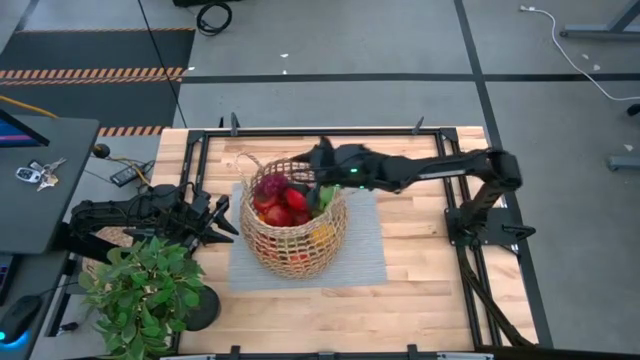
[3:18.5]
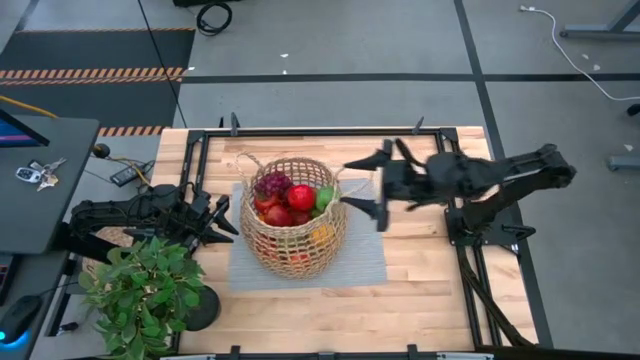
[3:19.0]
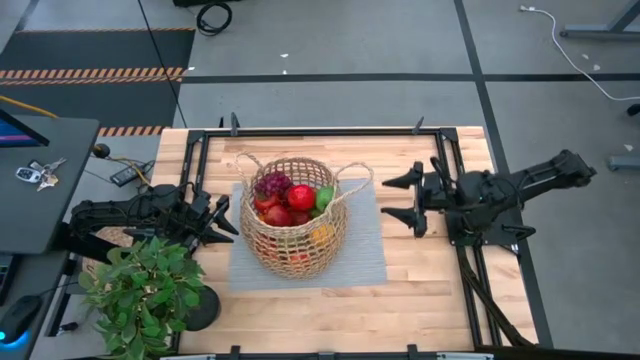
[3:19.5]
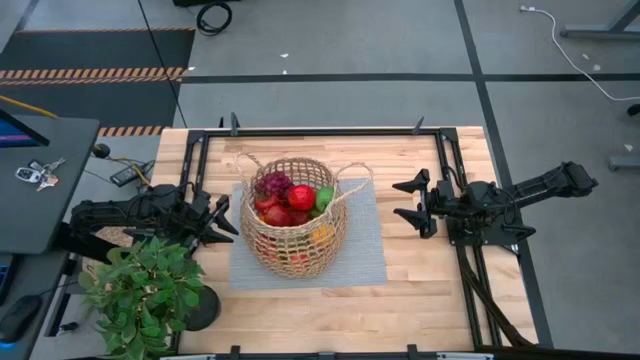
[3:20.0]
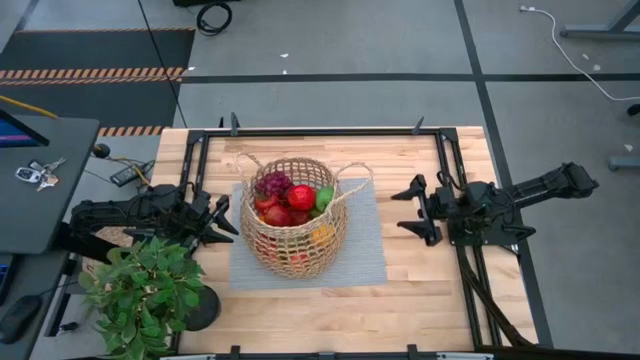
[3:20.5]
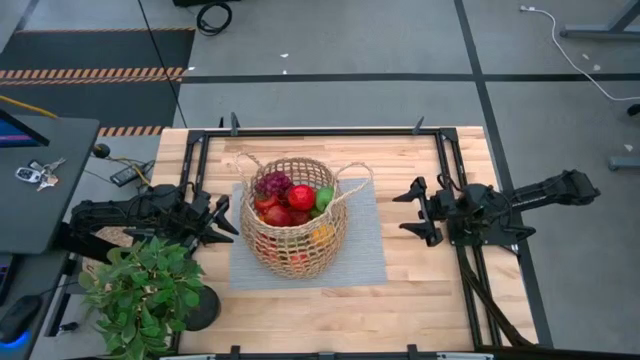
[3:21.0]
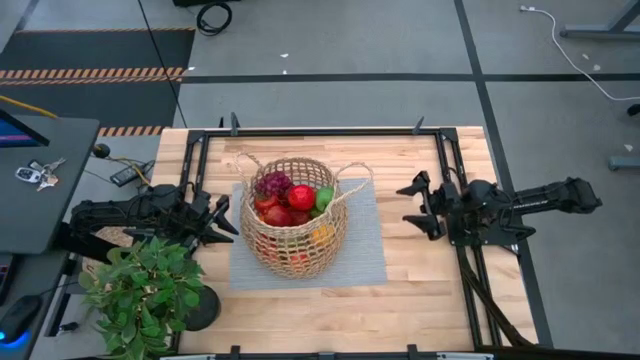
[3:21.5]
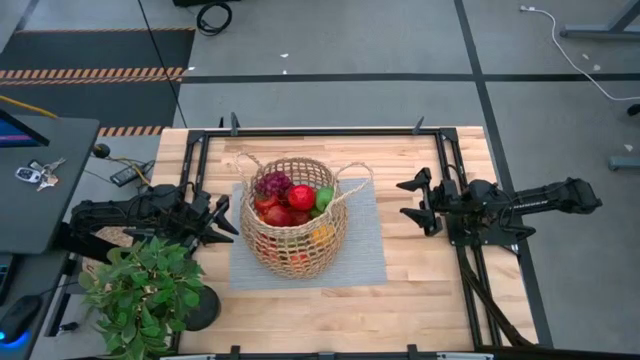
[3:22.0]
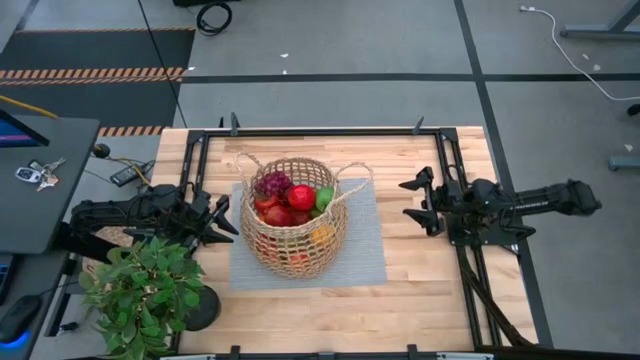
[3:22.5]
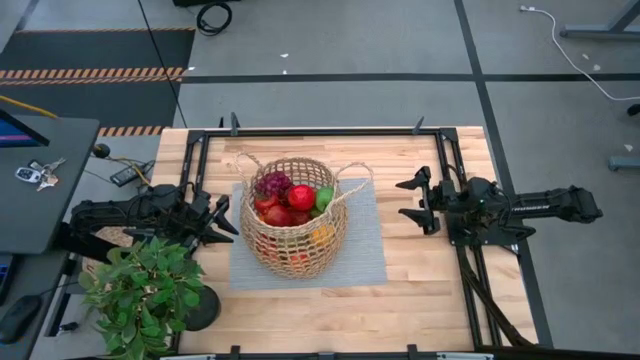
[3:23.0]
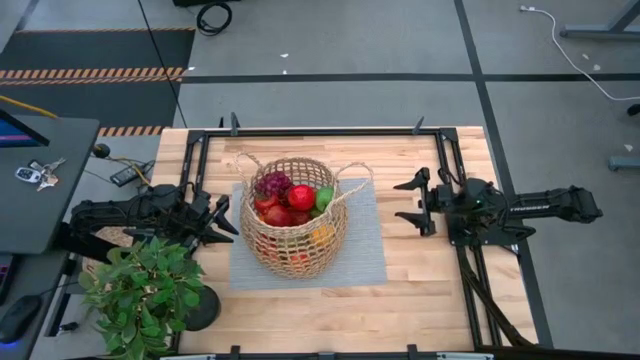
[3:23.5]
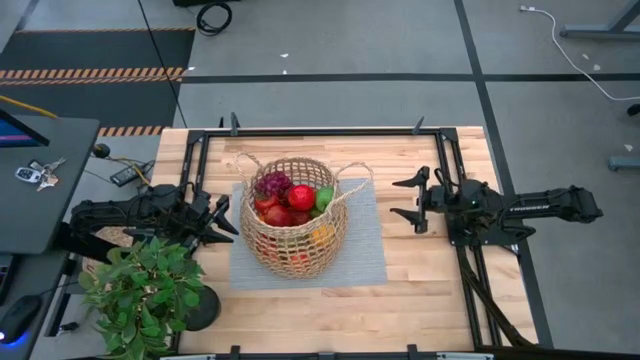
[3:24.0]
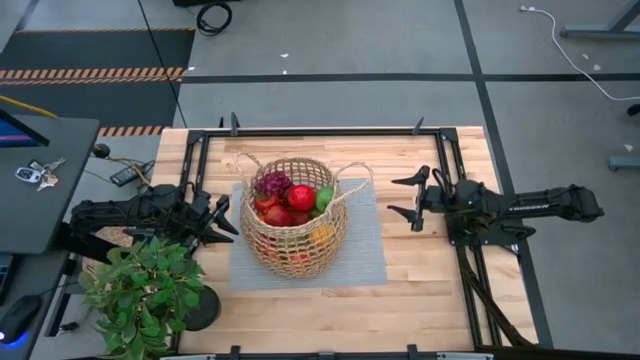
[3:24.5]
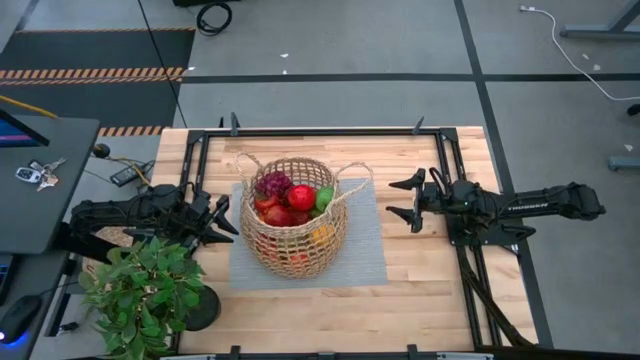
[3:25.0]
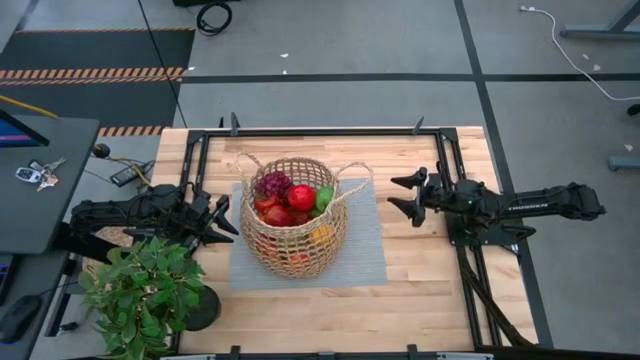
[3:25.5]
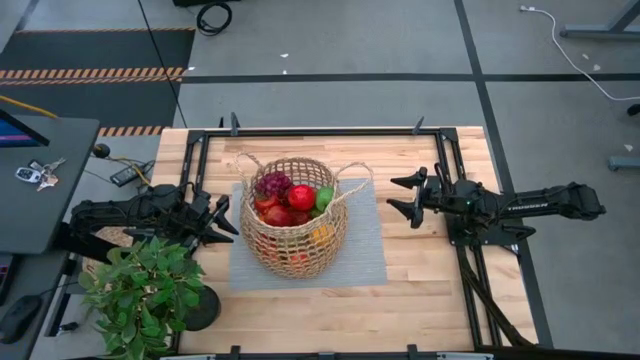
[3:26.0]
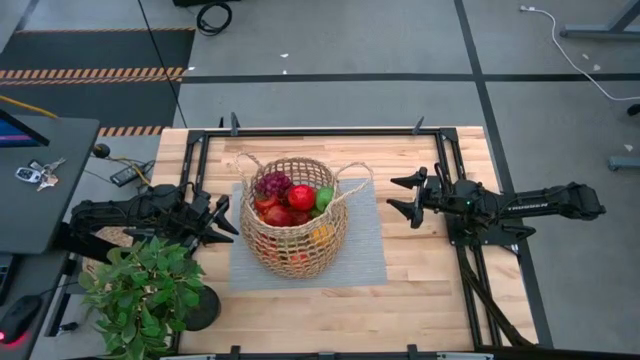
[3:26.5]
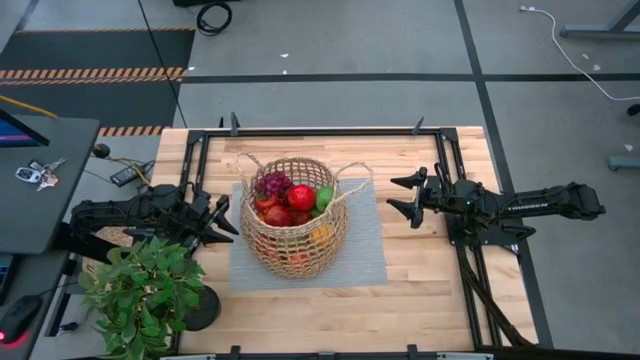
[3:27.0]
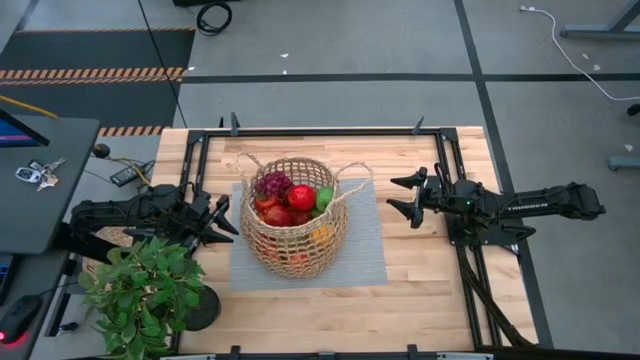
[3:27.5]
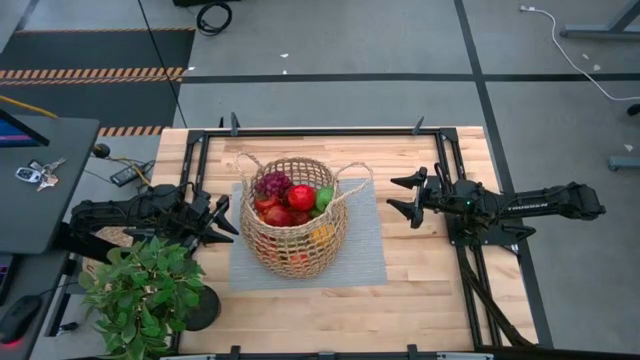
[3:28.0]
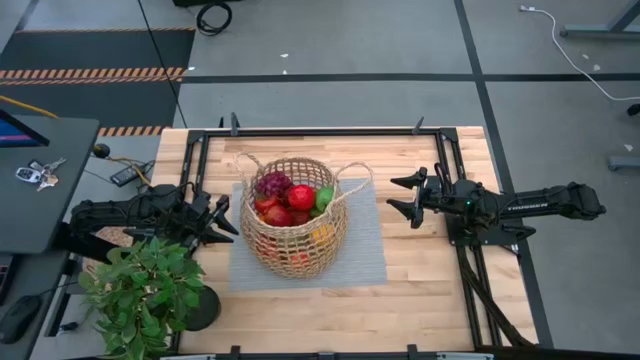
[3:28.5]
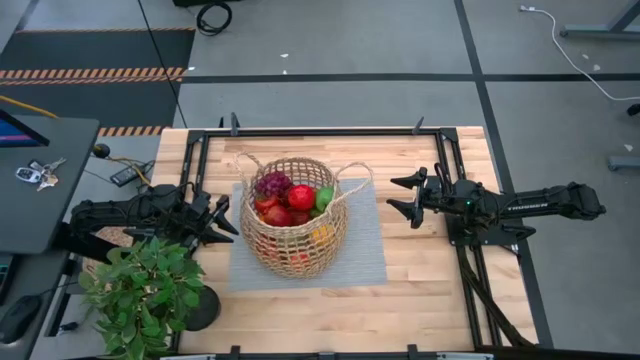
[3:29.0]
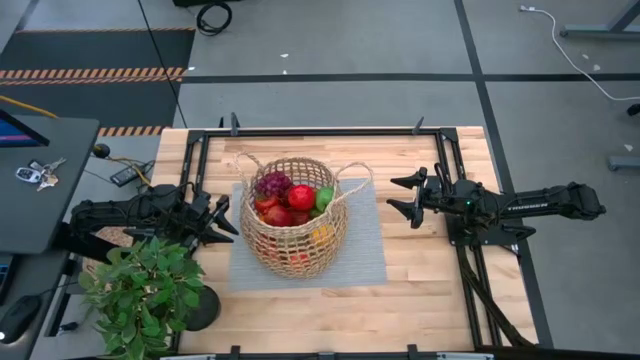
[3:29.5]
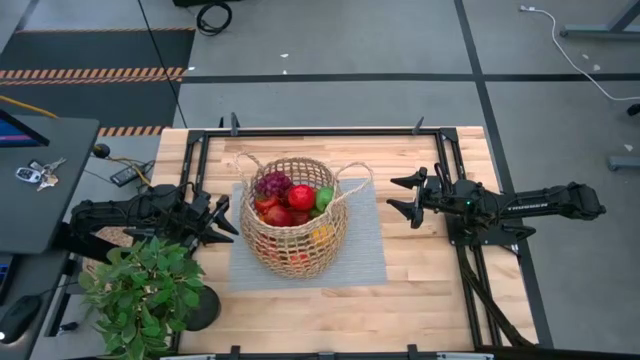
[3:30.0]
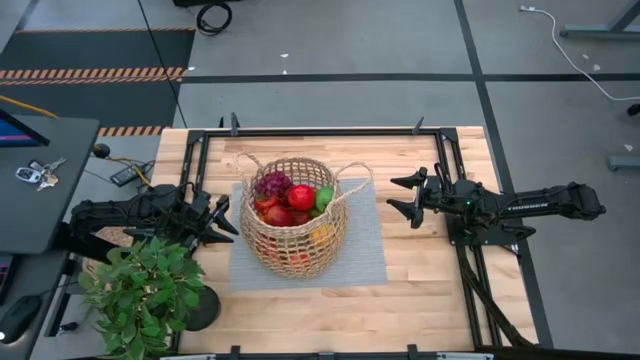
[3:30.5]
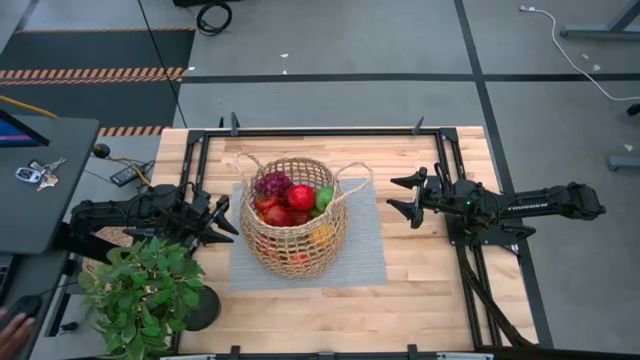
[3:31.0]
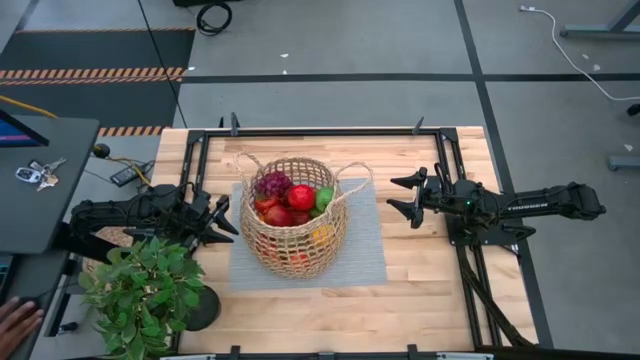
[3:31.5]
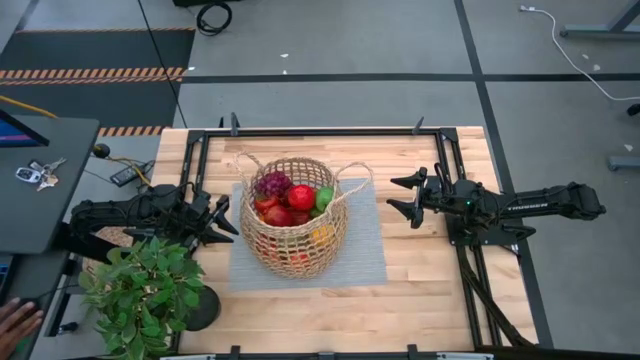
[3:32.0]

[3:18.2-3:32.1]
Task: Build produce basket
Return to Home Position

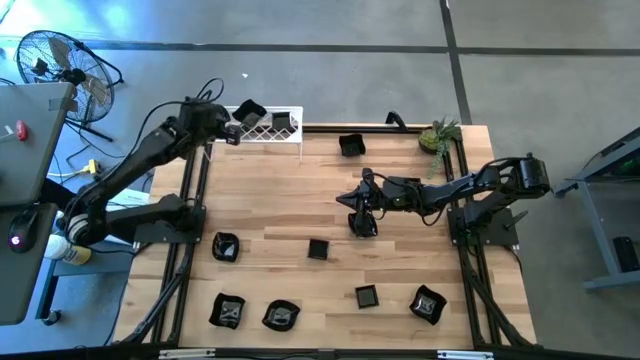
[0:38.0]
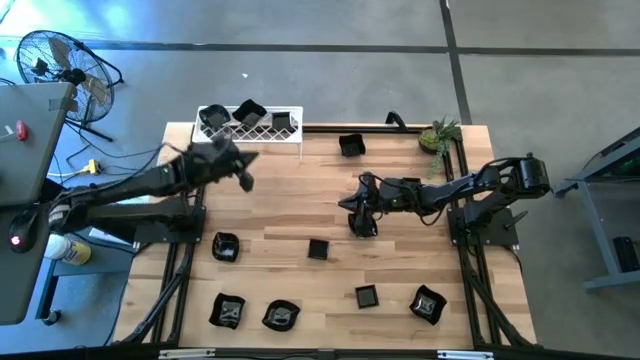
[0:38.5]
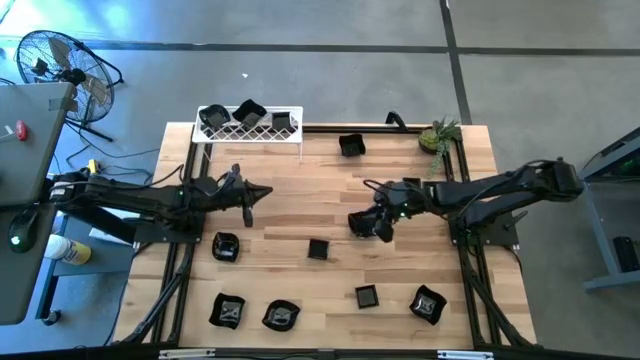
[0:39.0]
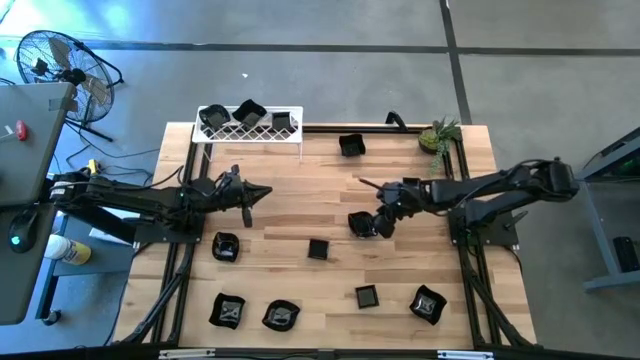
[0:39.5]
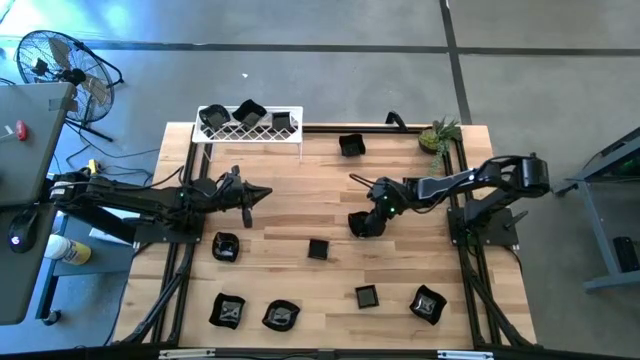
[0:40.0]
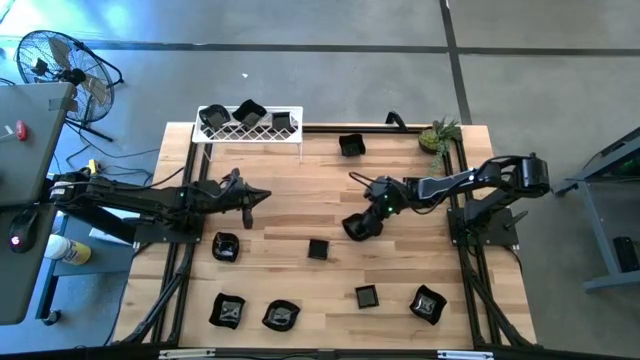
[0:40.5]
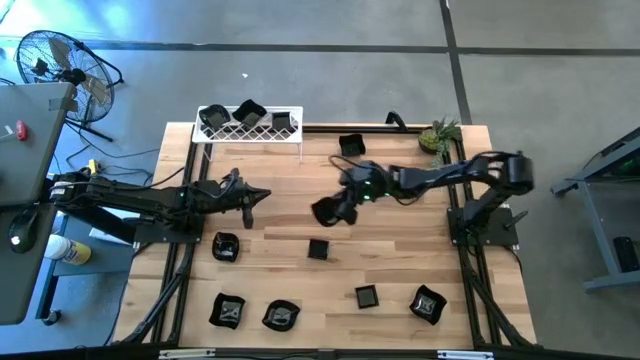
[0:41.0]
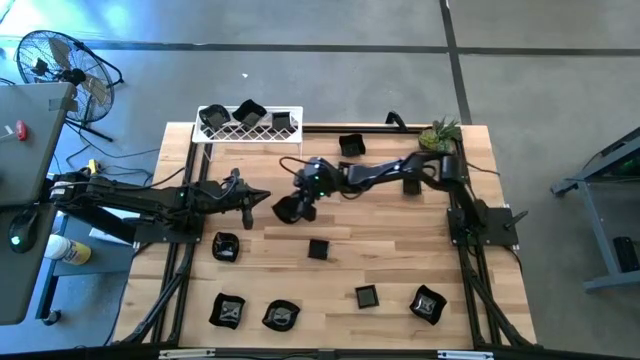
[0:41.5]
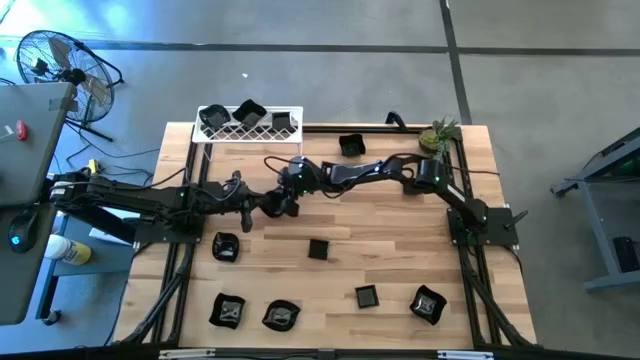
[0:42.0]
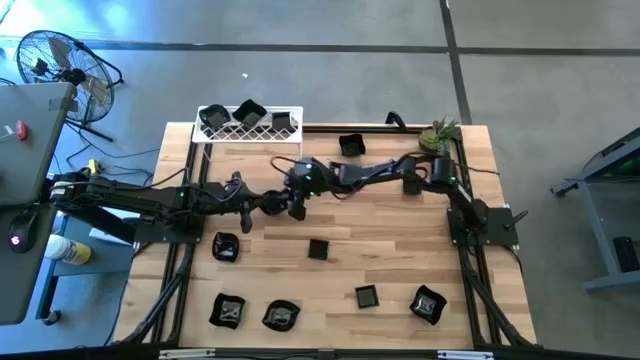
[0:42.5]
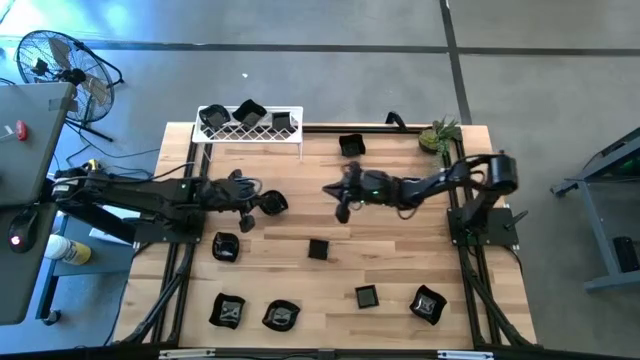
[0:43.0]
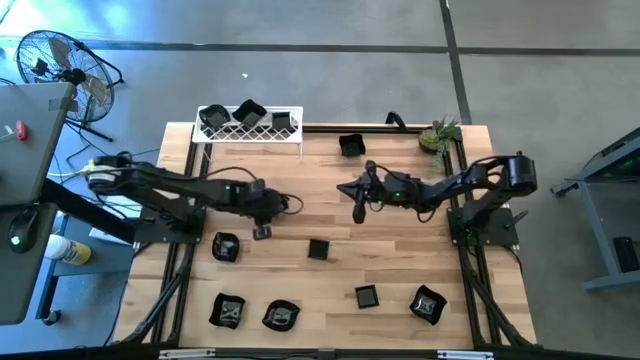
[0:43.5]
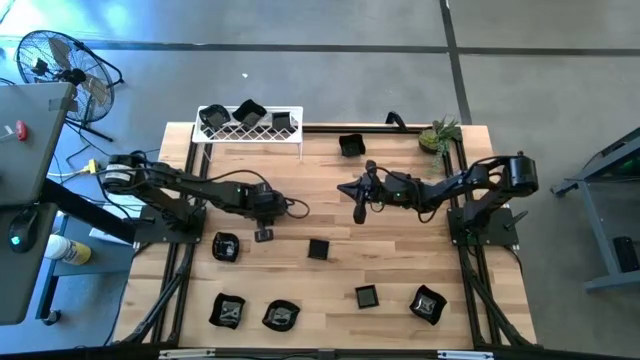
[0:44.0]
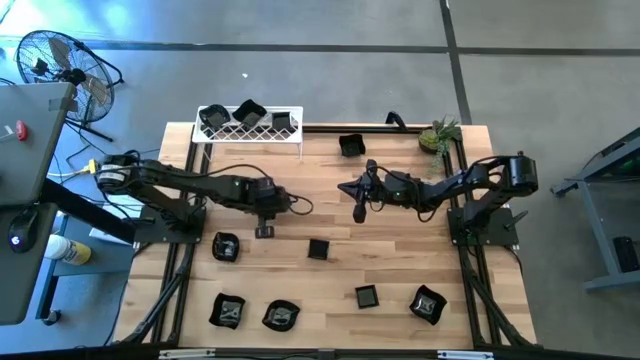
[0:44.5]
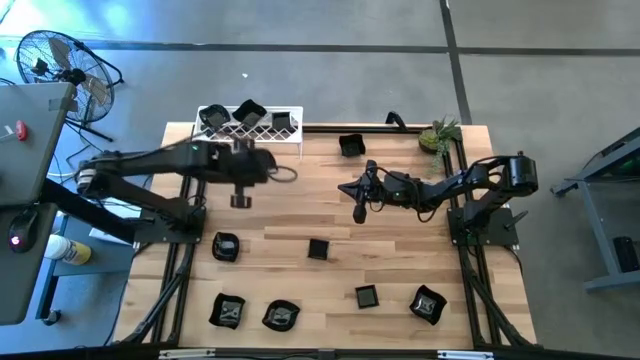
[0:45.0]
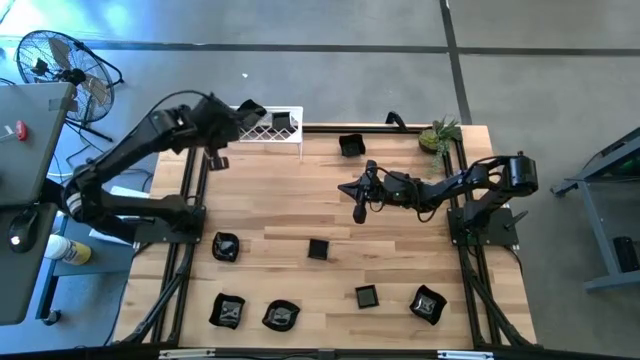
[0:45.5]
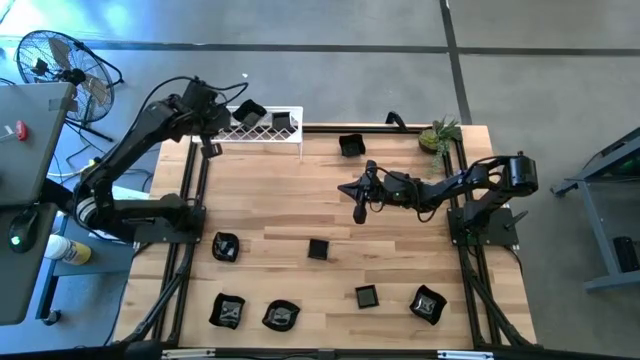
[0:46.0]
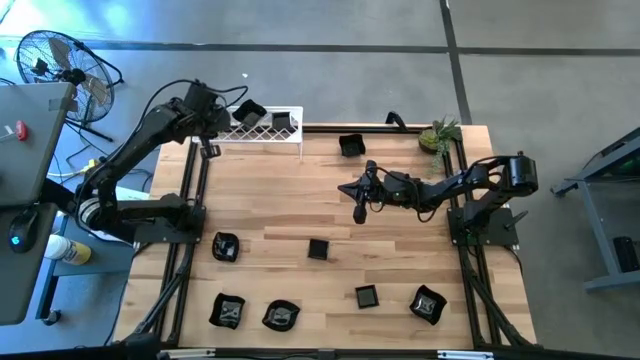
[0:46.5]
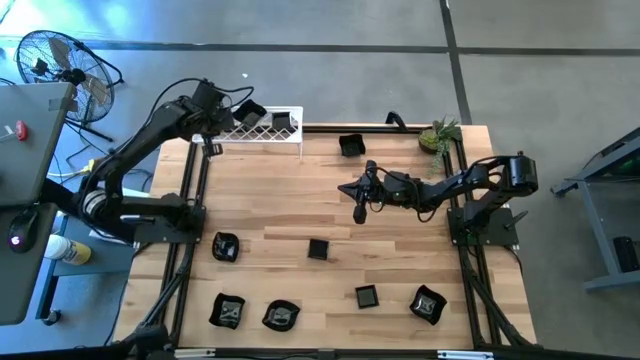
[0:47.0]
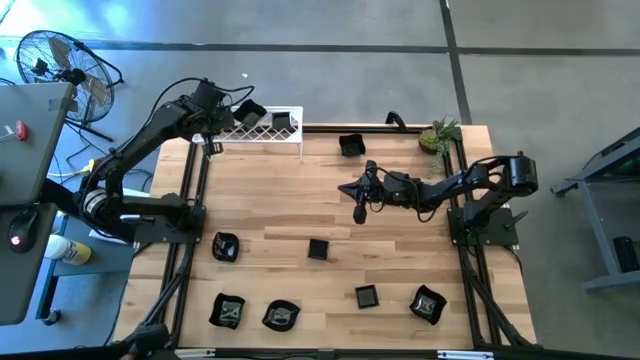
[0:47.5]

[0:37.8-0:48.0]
Task: Pick & Place Mini shaped plates
Stack the black leaf-shaped plate on top of the black leaf-shaped plate on the shelf
